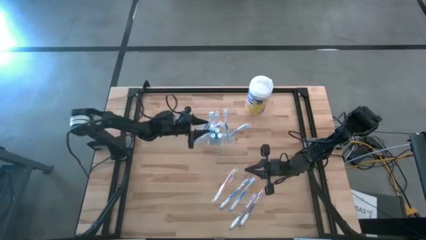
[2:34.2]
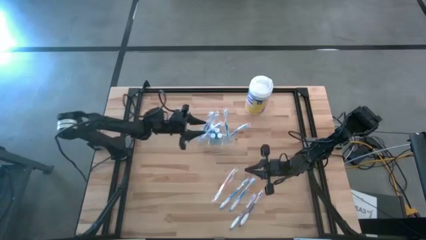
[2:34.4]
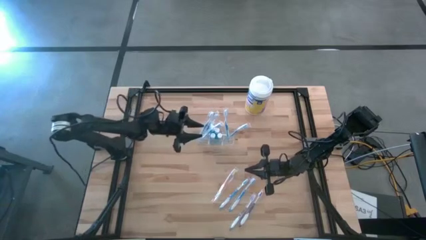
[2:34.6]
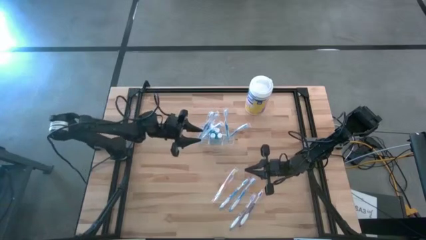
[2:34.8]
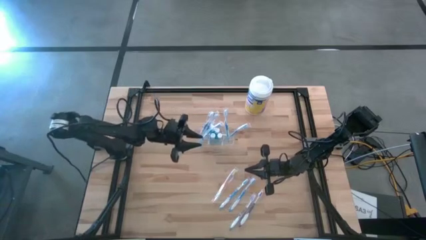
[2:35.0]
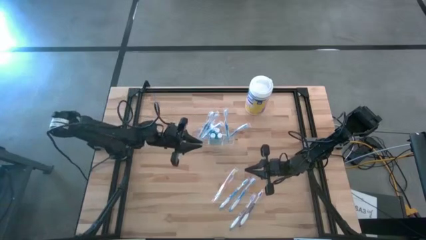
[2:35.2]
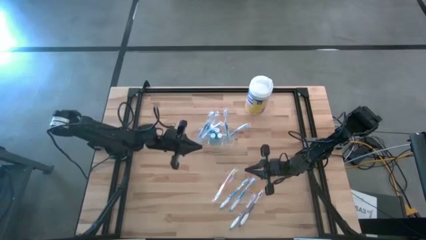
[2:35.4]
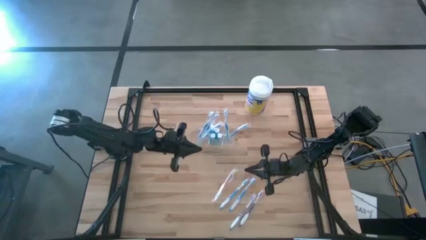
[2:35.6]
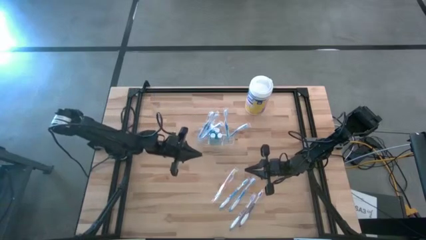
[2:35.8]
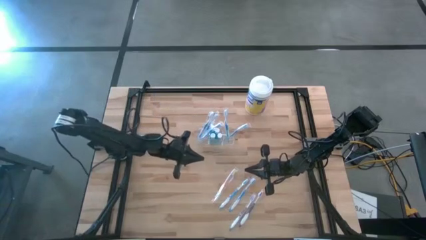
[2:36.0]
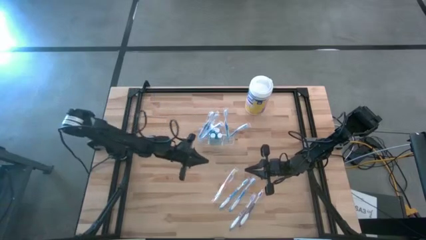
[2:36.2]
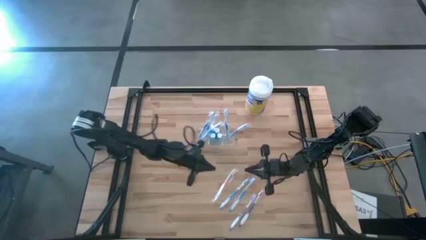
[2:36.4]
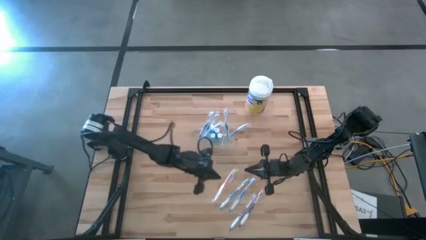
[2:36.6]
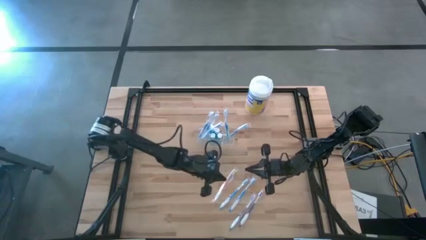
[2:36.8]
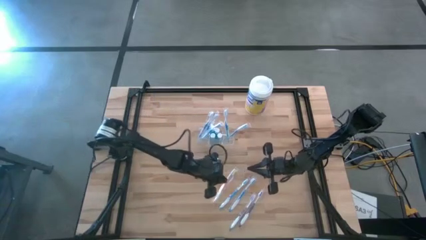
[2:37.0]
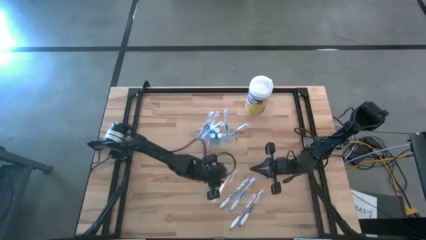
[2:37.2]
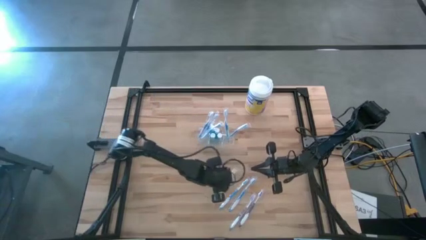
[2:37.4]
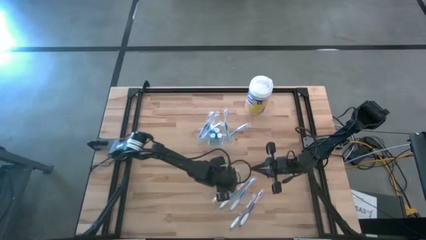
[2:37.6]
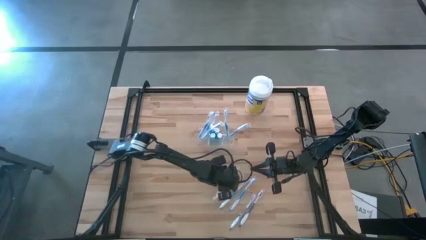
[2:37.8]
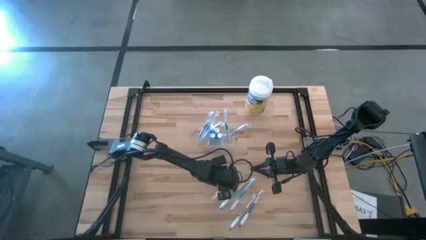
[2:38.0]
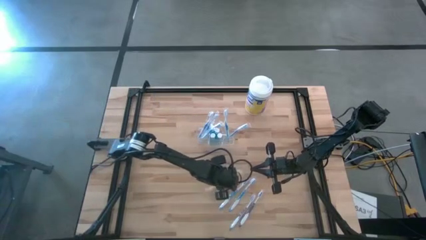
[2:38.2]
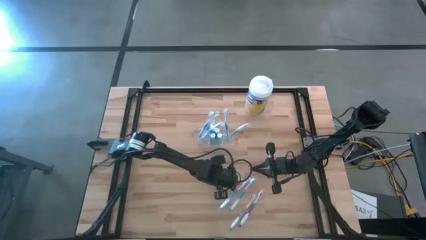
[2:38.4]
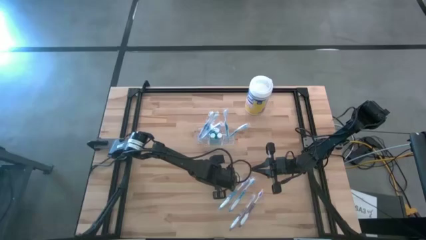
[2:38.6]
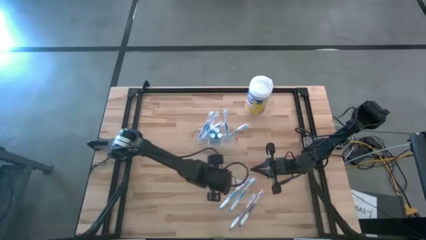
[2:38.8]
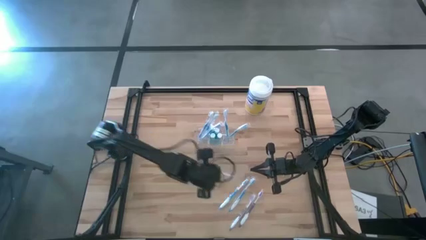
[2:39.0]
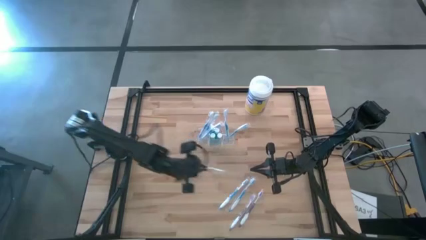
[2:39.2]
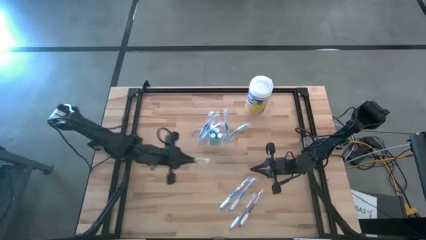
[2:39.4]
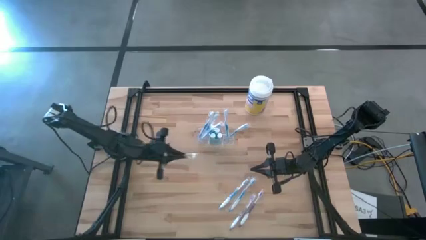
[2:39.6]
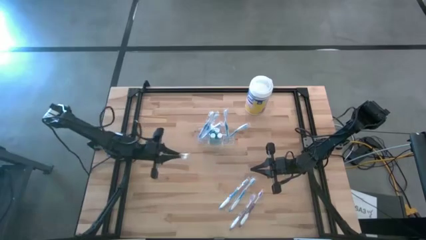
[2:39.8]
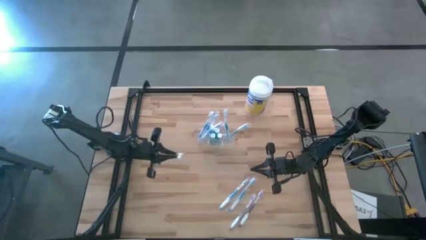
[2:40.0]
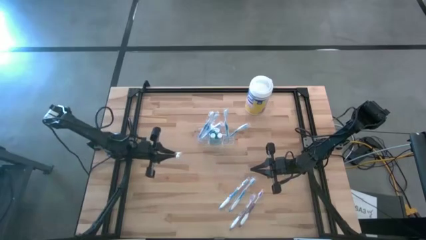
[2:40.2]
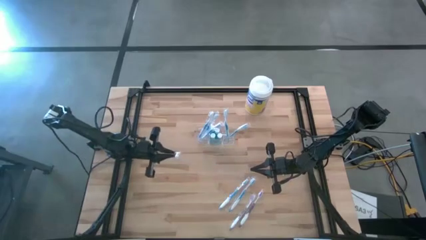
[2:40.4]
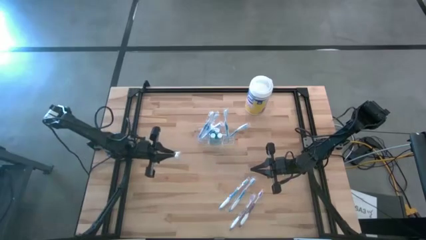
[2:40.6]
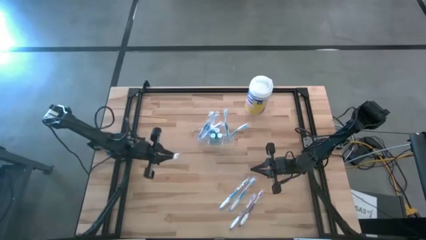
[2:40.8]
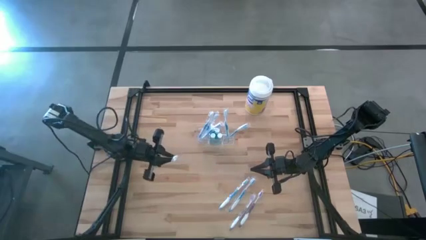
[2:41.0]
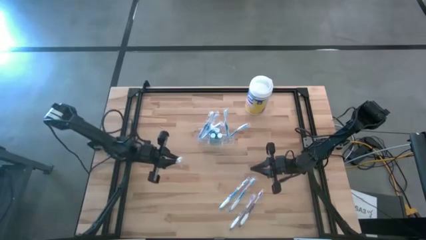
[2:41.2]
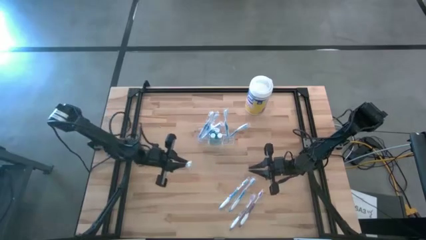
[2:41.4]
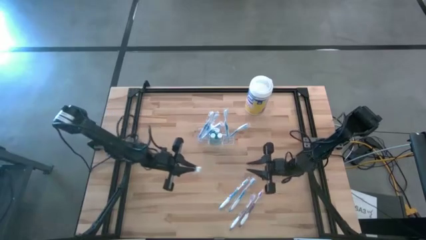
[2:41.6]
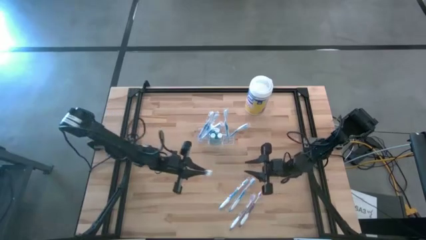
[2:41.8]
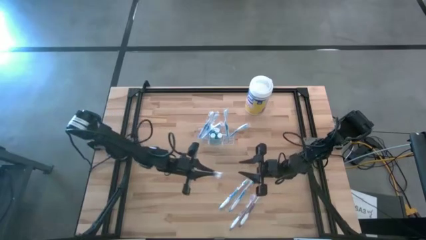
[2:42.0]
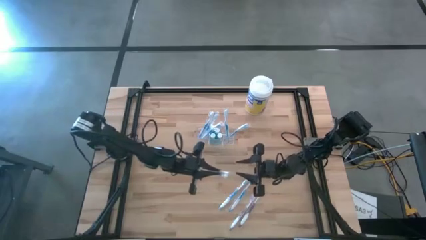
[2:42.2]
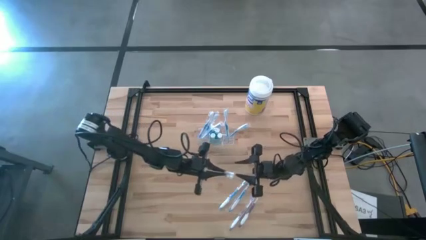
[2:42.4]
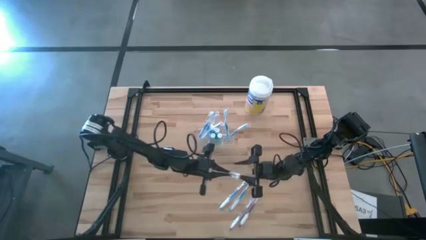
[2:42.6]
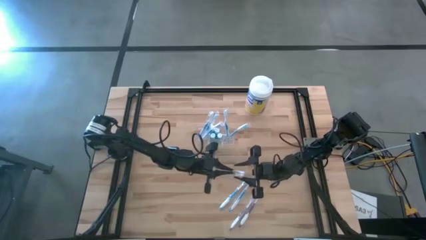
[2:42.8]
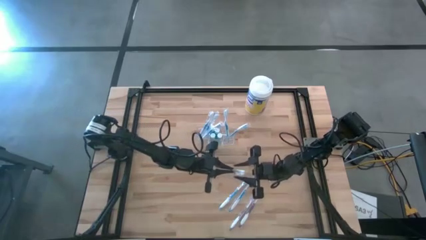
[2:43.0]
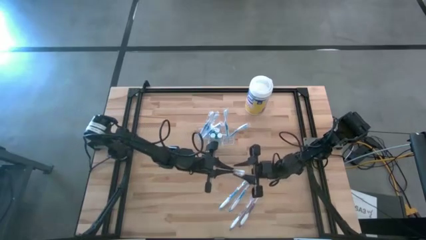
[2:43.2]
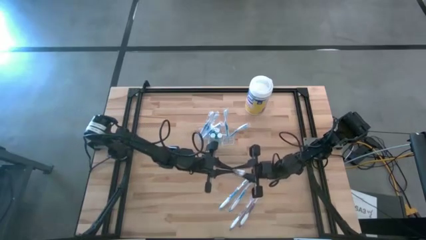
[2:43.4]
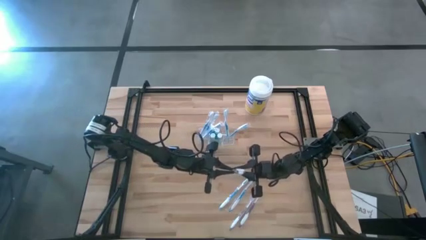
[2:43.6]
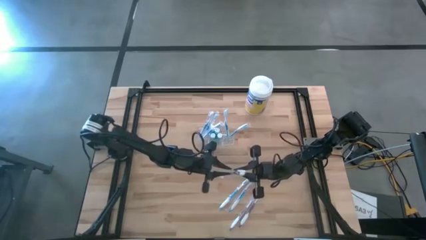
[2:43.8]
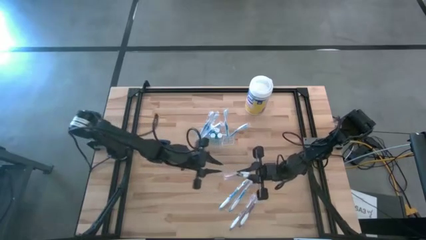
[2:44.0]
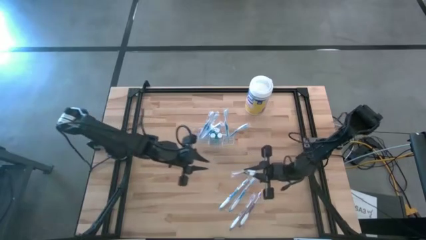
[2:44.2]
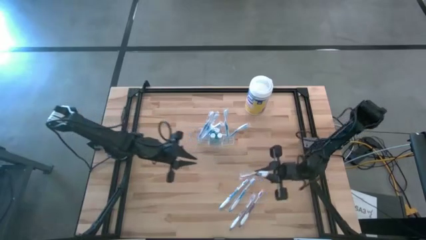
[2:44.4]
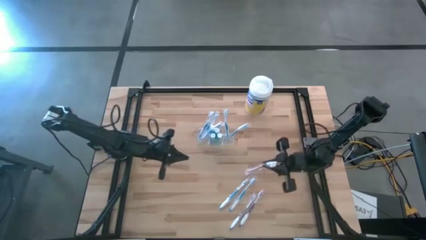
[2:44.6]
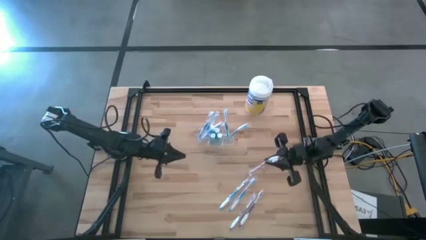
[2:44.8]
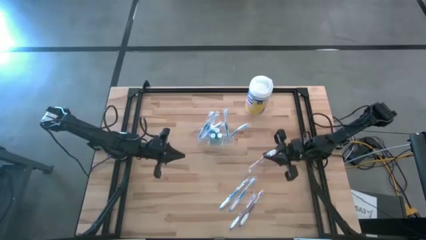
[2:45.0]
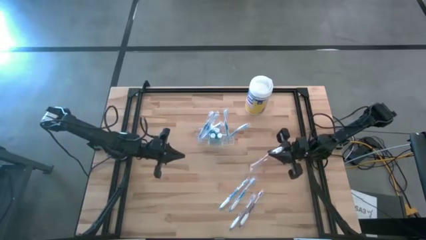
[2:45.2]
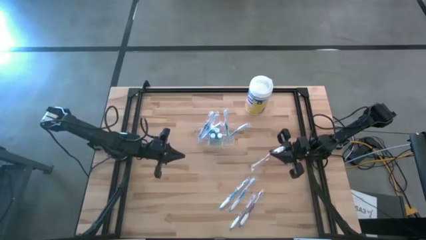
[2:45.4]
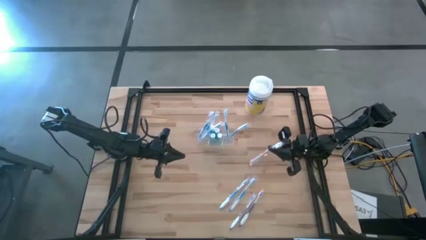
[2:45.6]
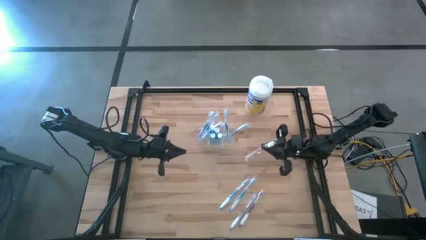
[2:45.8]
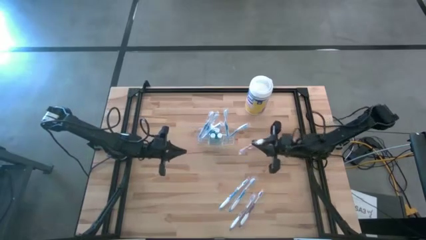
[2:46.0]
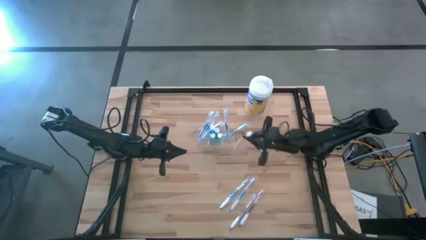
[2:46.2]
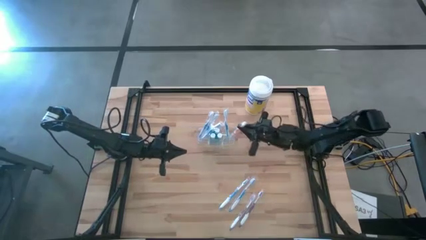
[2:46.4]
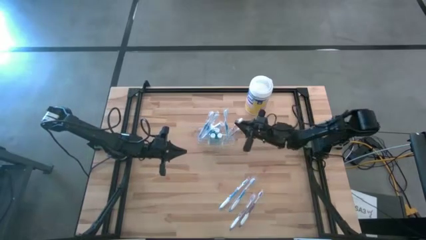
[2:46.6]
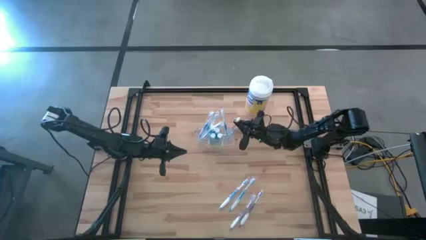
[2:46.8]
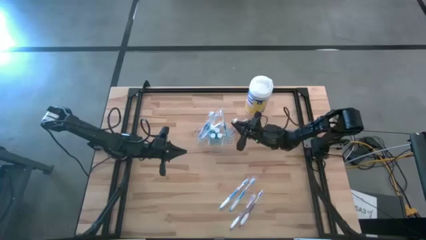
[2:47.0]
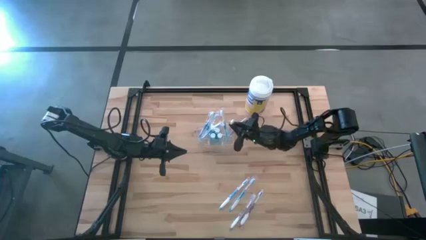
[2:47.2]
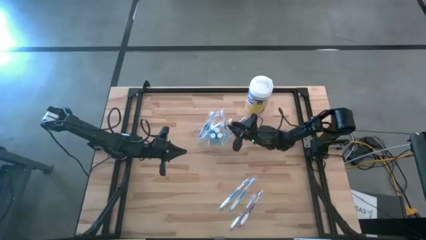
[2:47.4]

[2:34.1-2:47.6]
Task: Pick & Place toothbrushing station
Put the orange toothbrush into the transparent organizer
